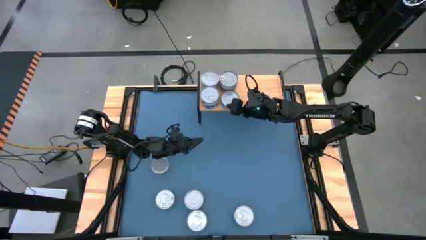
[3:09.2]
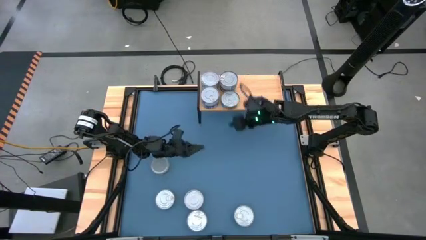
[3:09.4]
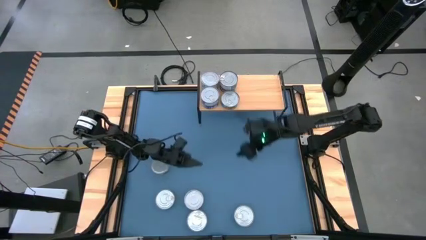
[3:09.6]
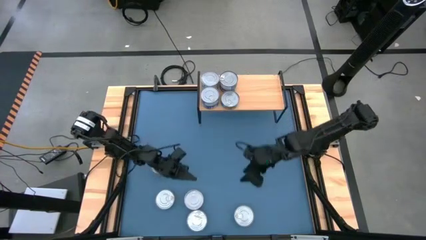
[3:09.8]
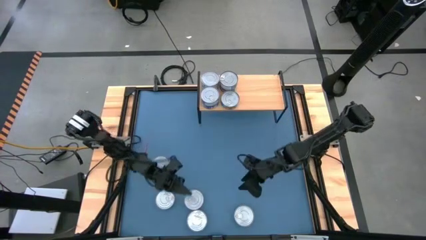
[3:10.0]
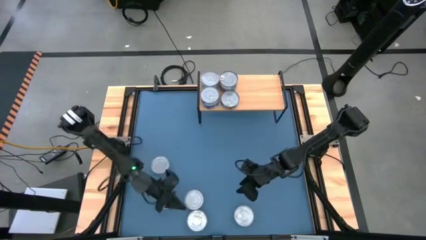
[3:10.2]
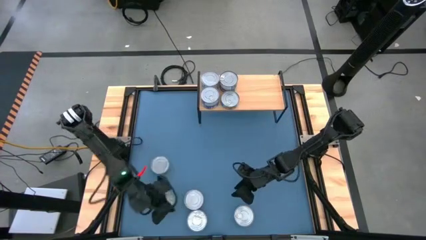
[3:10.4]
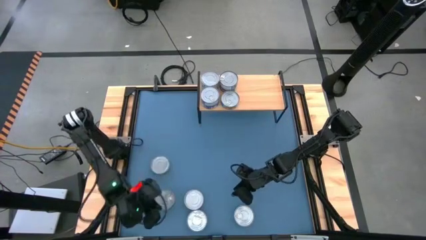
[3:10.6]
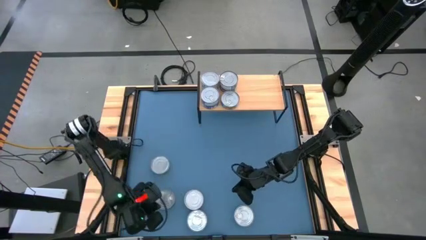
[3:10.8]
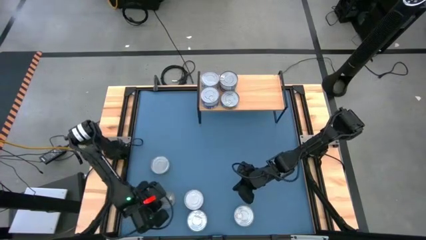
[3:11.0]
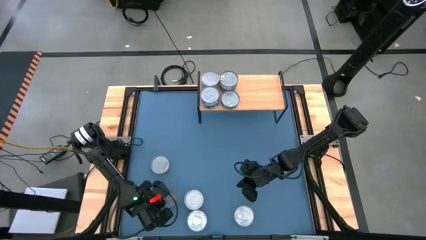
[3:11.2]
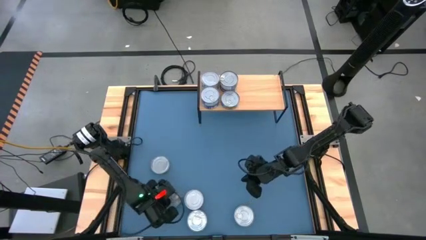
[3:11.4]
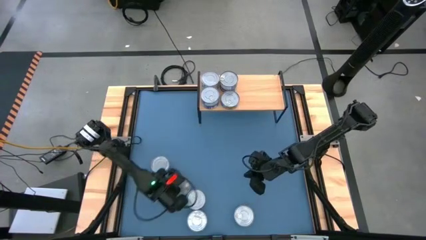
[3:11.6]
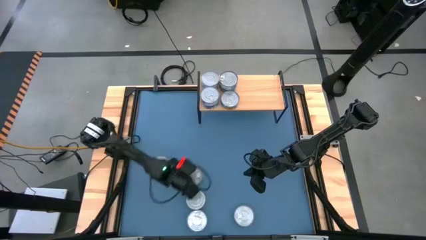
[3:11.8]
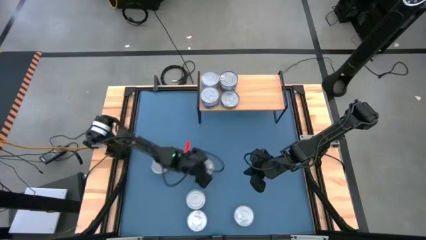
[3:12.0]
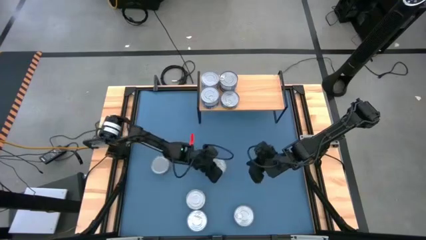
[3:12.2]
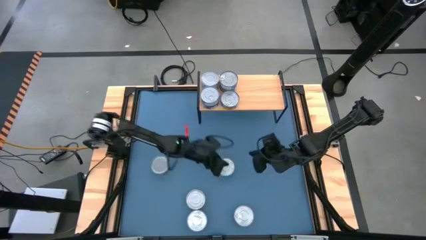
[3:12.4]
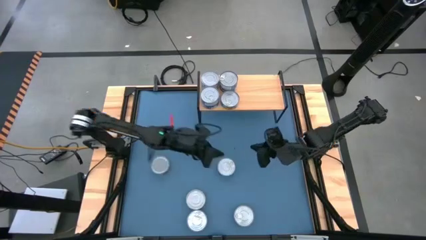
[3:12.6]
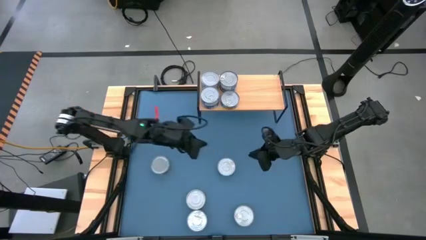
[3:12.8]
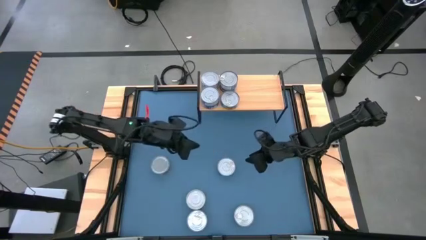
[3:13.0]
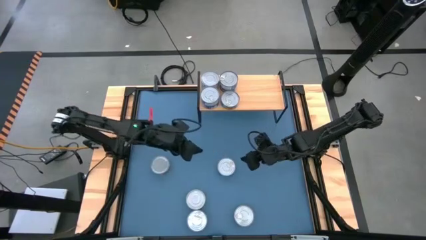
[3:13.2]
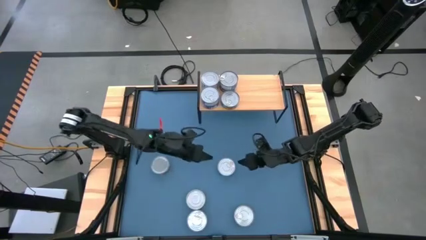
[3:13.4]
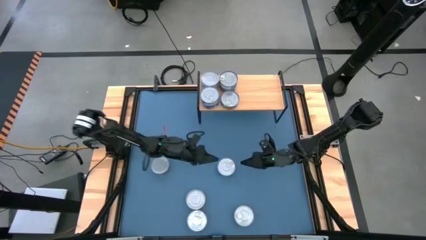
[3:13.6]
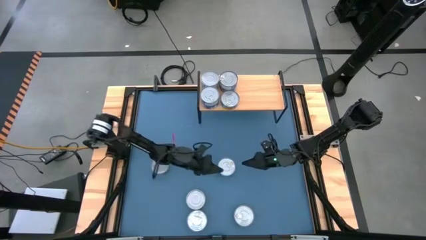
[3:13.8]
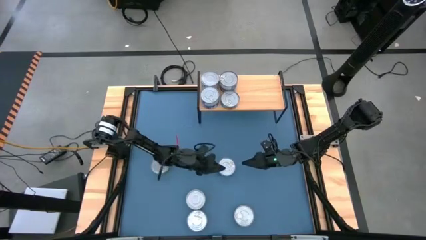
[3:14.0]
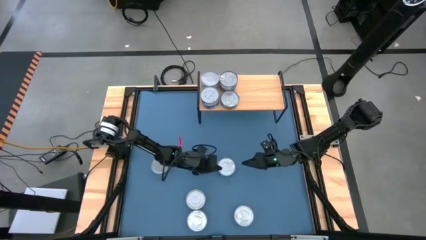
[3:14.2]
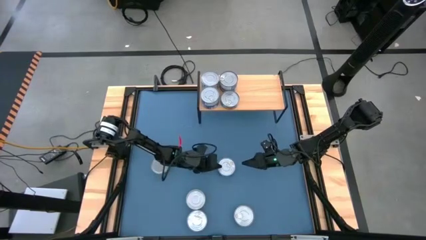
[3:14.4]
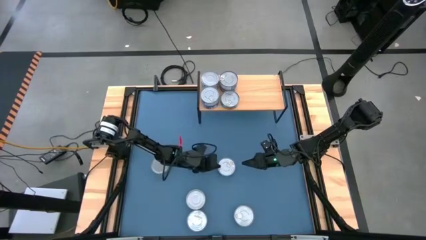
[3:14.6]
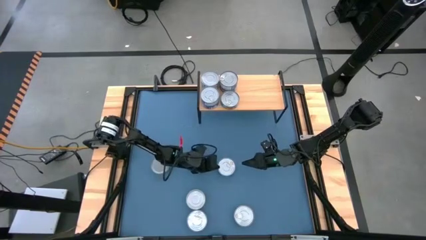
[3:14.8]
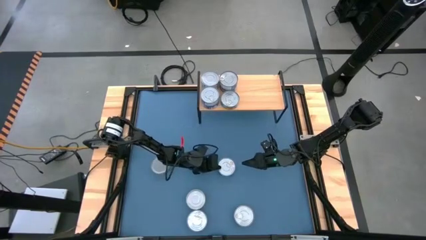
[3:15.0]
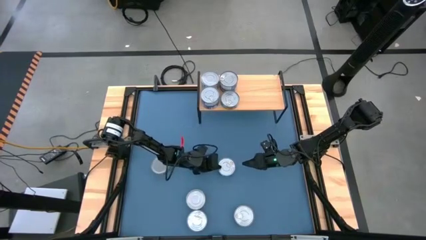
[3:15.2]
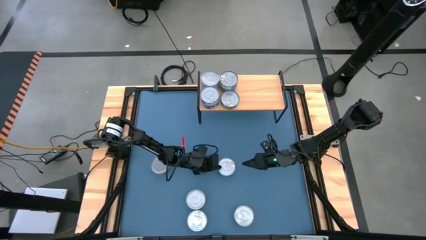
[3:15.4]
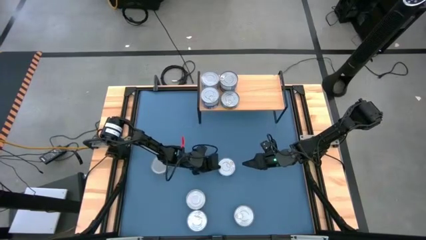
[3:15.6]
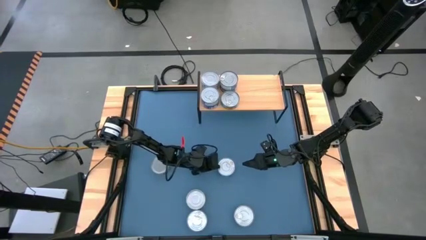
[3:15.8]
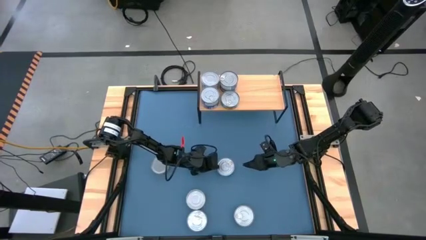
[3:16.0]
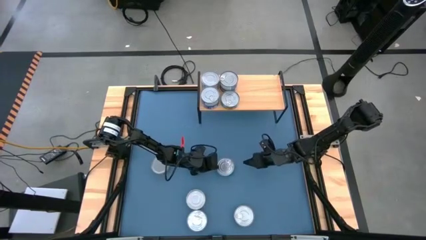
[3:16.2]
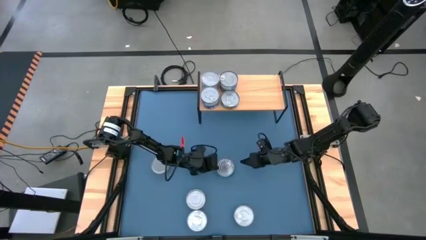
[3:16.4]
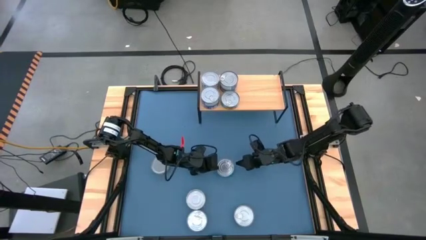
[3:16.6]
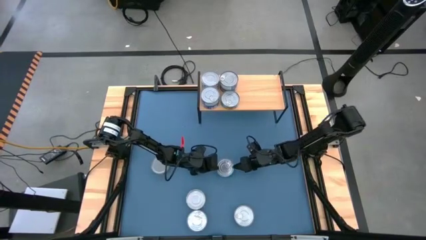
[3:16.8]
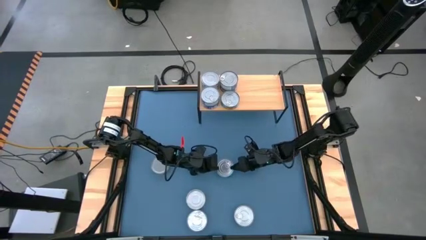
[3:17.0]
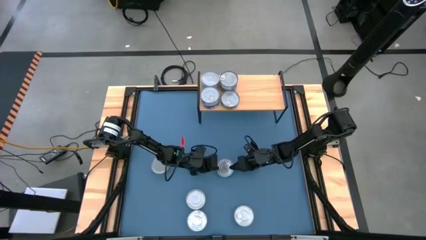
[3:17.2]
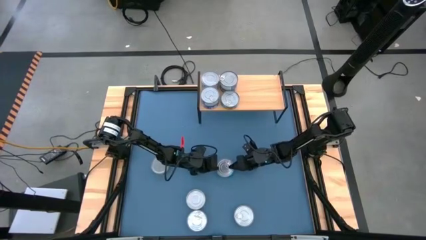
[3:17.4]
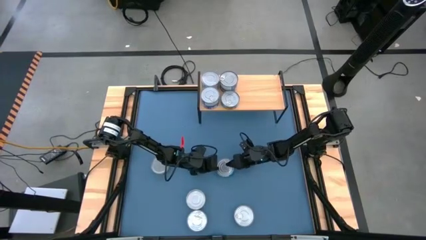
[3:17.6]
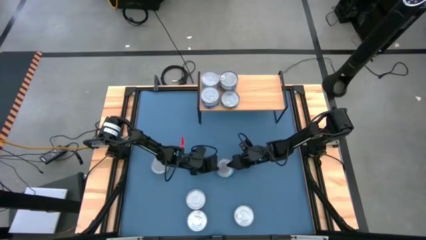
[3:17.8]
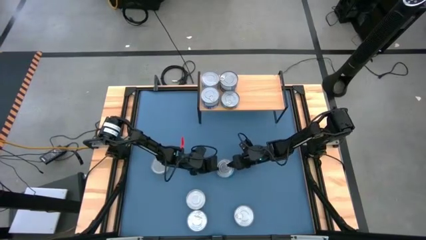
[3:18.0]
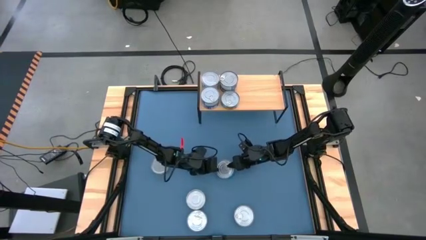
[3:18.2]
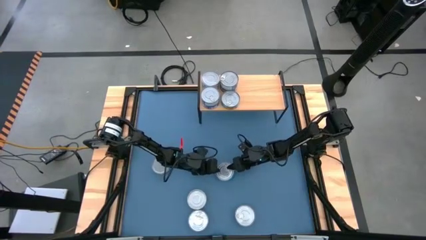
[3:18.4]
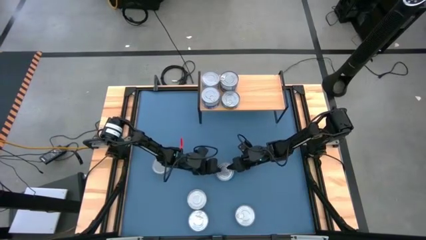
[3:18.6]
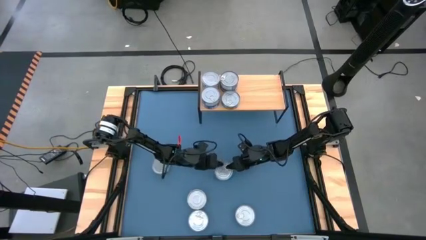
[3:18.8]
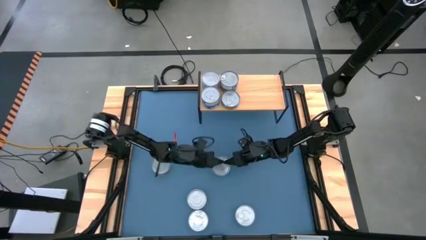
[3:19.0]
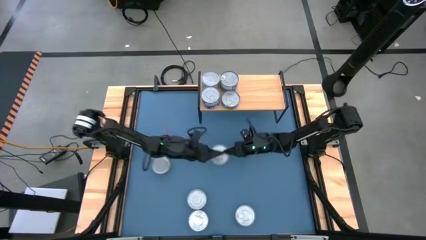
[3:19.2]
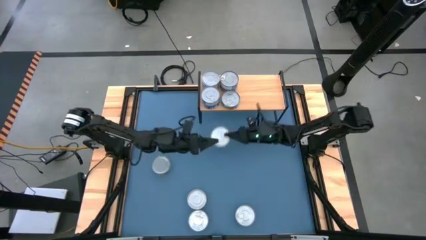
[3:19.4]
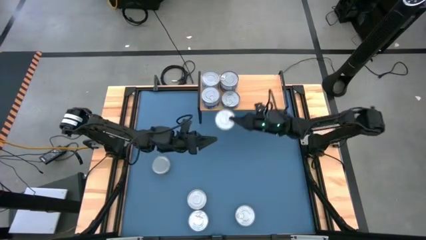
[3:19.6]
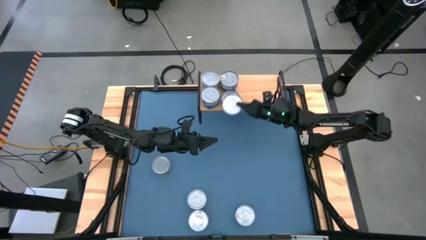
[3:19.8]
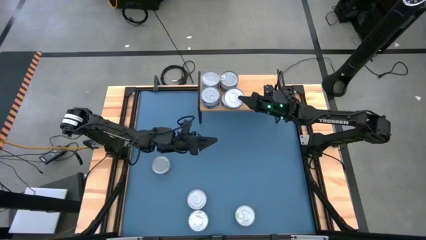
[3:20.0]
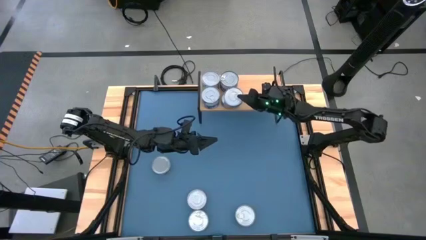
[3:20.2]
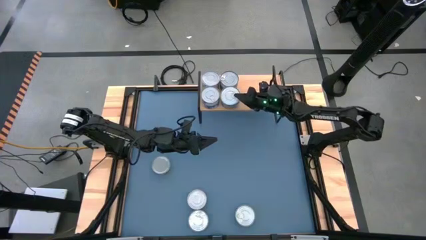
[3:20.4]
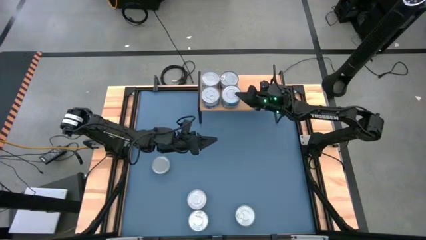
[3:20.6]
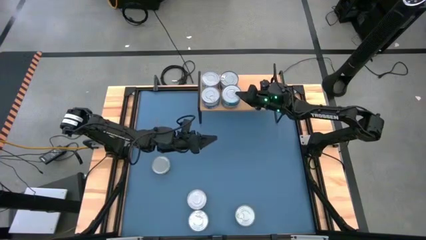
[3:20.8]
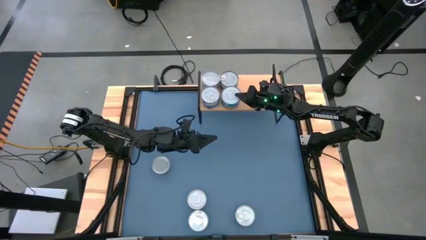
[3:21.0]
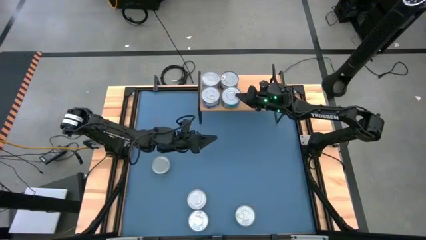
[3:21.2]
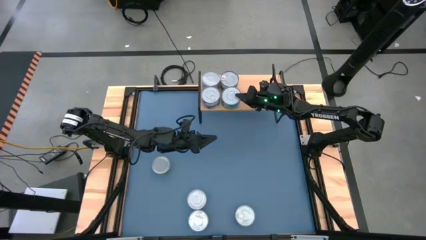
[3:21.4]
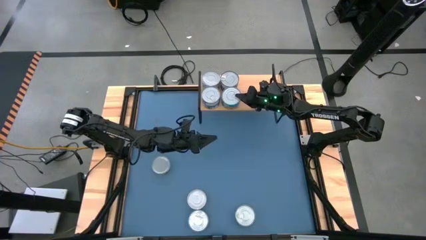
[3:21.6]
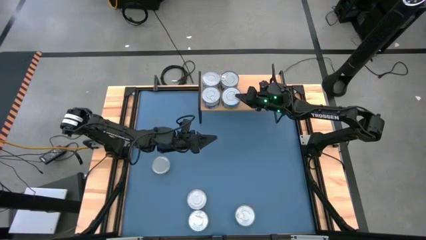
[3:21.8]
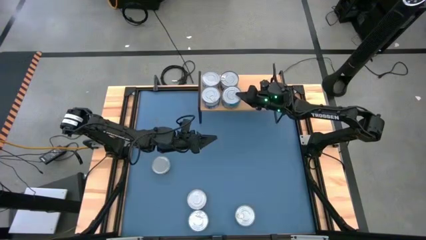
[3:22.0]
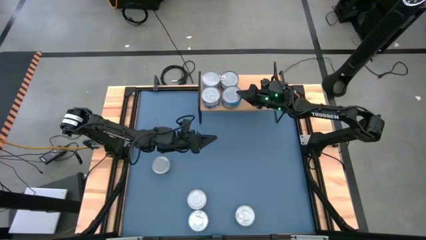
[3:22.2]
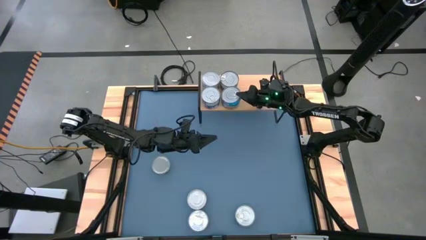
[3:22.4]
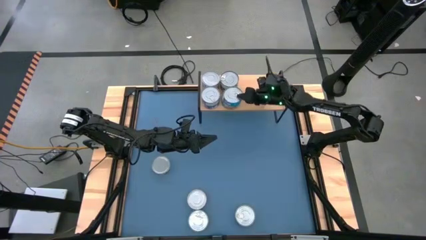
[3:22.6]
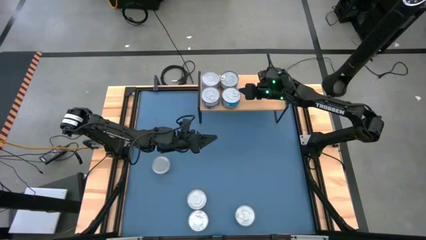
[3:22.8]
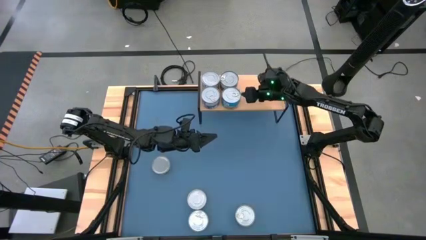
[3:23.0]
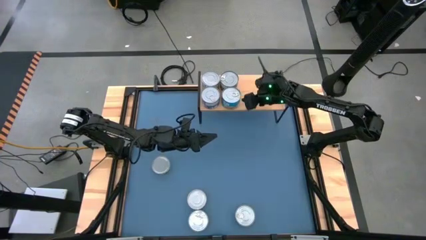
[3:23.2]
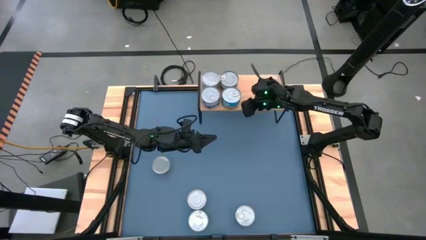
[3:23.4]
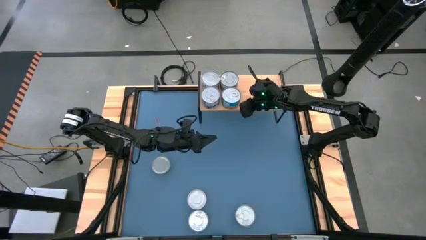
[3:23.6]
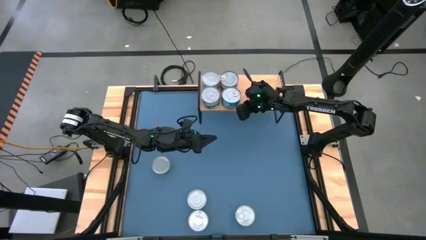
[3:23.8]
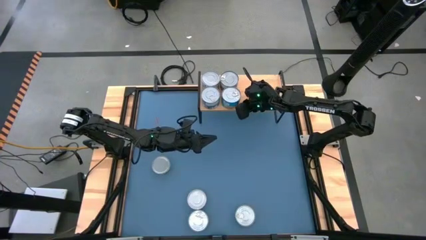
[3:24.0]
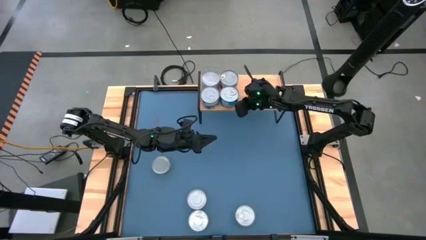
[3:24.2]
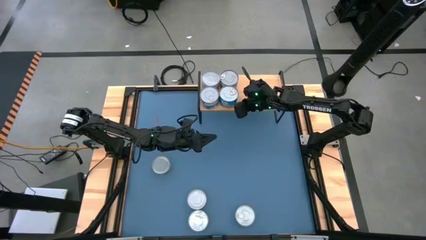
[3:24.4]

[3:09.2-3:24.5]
Task: Stack canned seafood by type on shelf
Stack the yellow blue tuna can on top of the yellow blue tuna can on the shelf

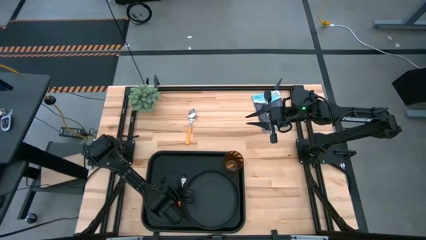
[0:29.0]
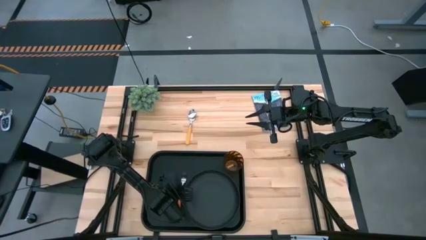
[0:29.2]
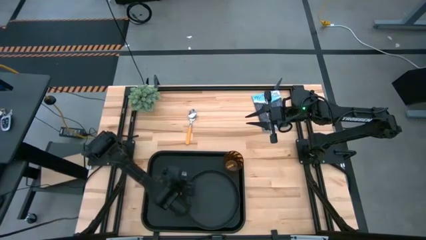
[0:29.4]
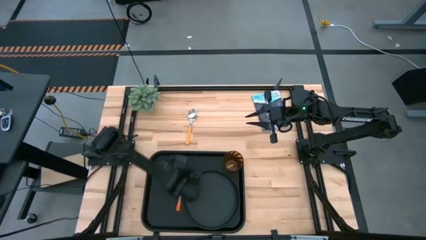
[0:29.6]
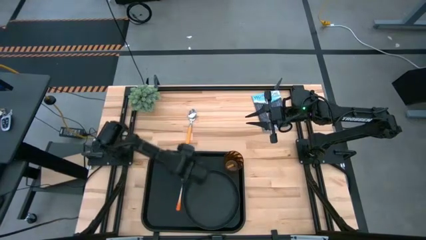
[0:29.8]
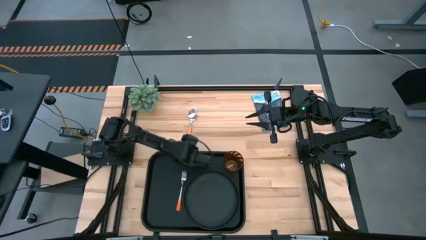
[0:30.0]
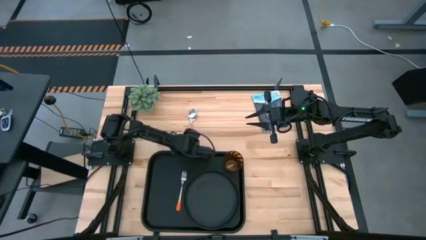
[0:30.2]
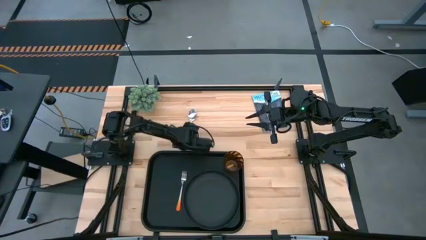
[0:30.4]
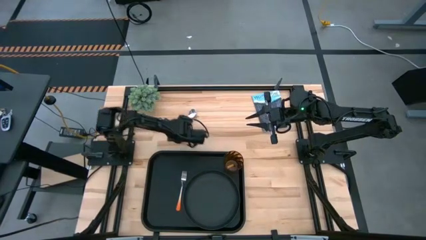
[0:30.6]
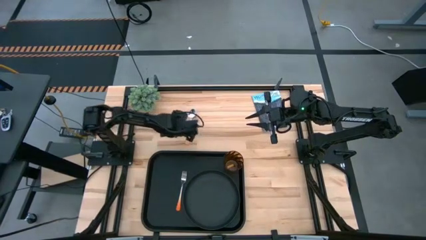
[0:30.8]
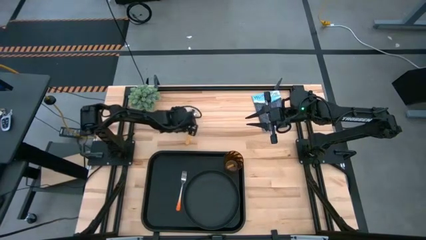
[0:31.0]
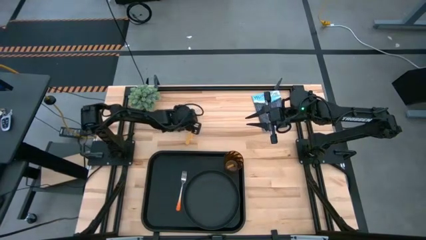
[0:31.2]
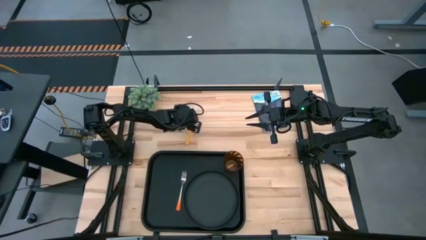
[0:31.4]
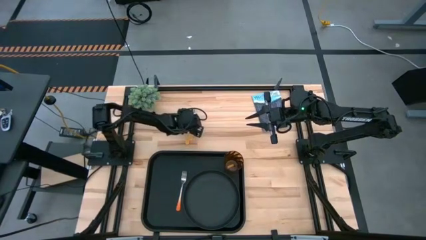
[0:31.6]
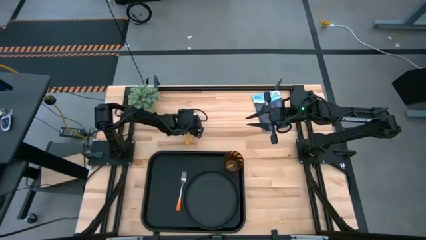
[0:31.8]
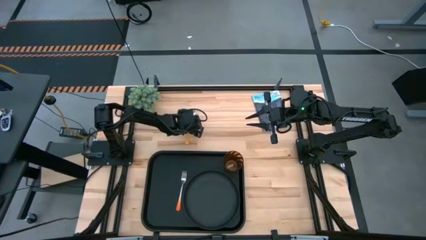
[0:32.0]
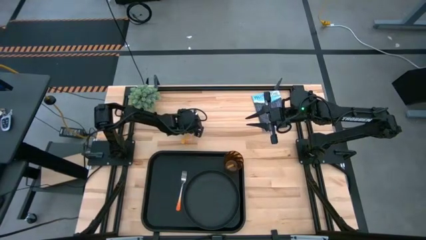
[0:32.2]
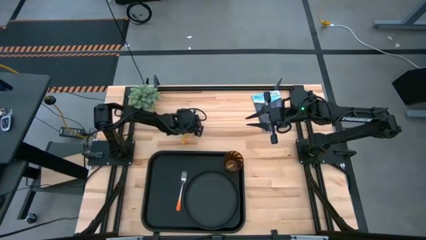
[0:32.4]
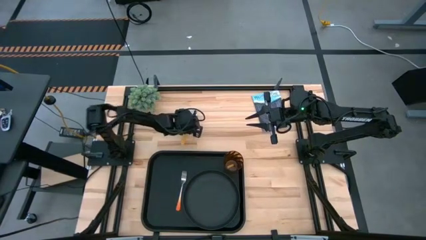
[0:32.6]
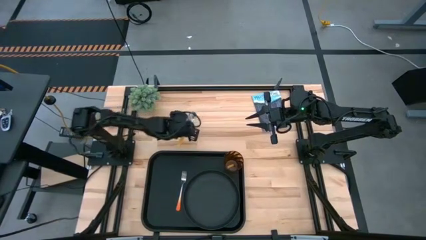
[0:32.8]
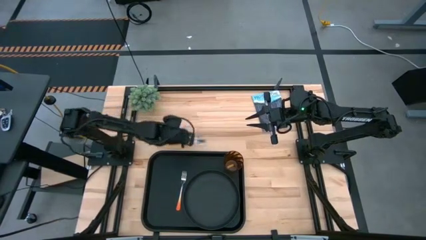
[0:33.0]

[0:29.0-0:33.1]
Task: Pick and place plate/cup/fork/spoon on tray
Put the yellow spoon on the black serving tray to the left of the orange fork
